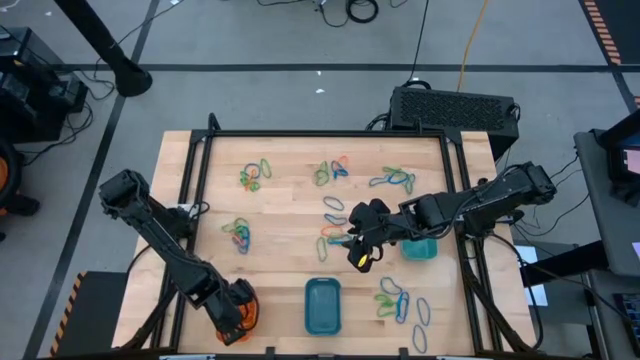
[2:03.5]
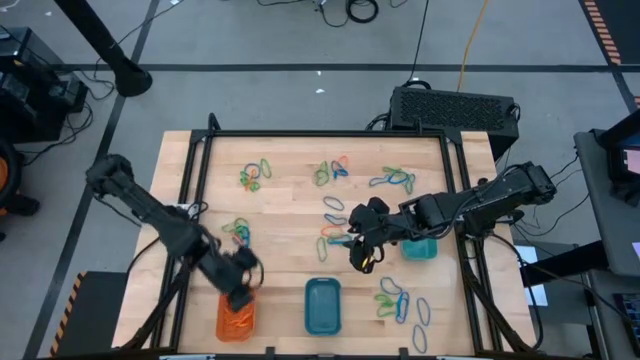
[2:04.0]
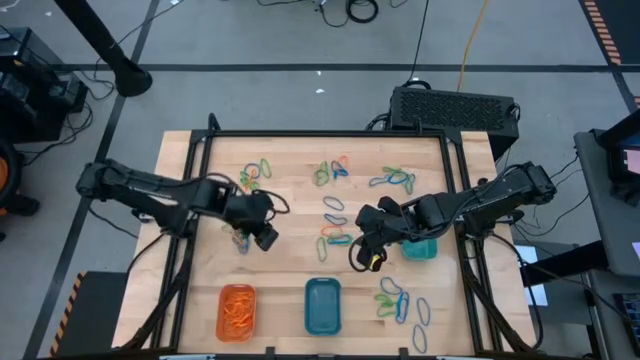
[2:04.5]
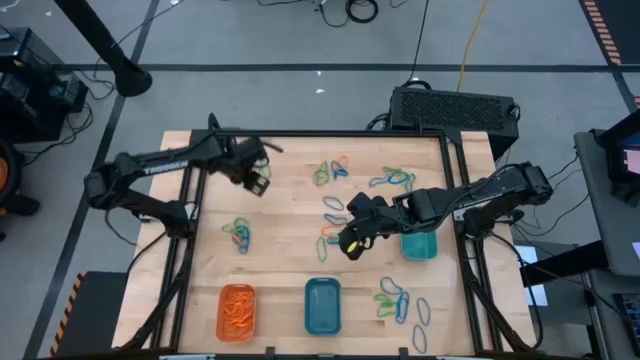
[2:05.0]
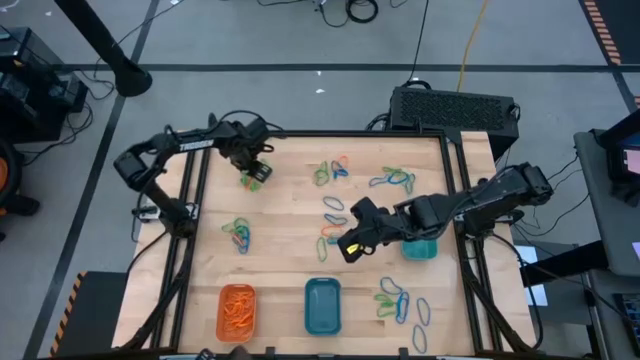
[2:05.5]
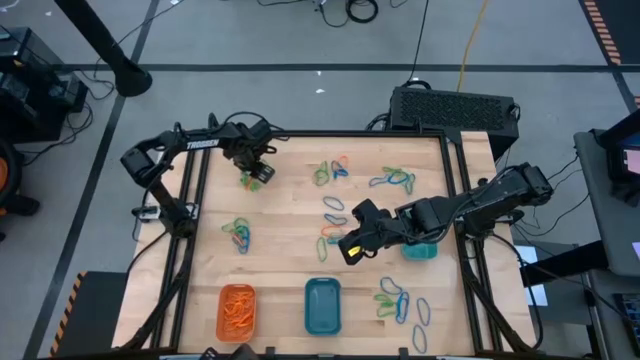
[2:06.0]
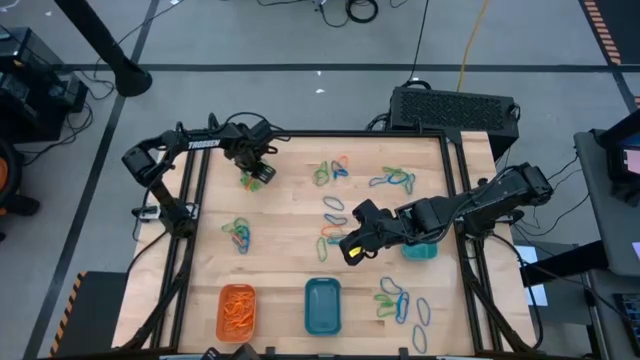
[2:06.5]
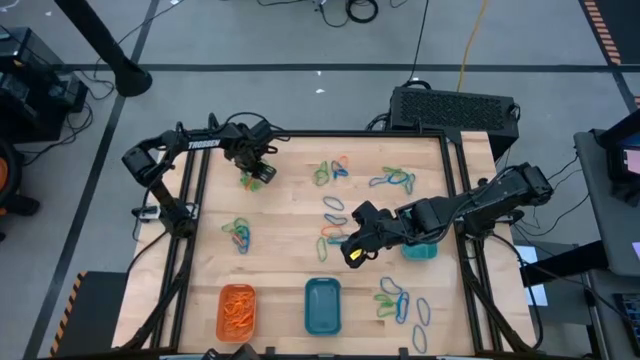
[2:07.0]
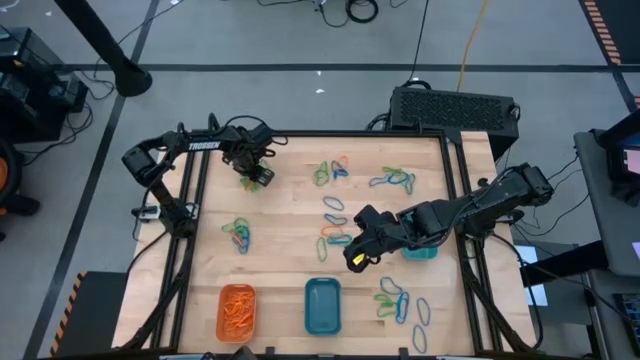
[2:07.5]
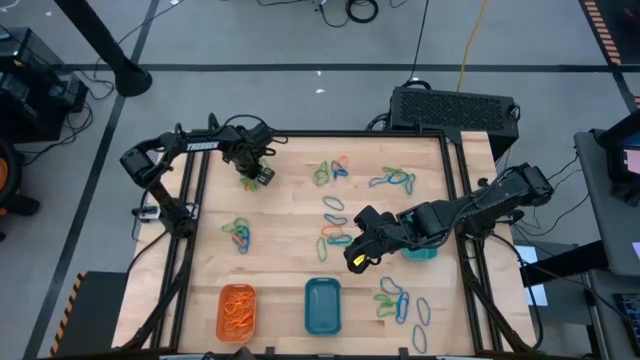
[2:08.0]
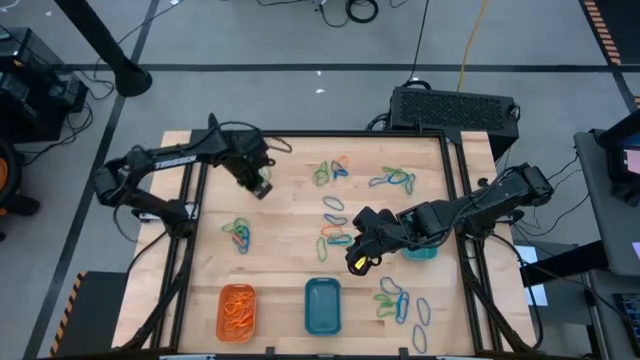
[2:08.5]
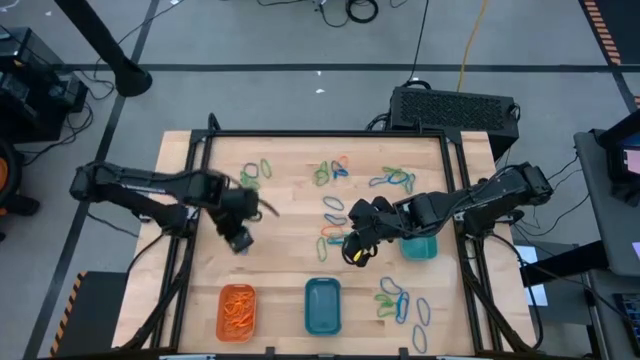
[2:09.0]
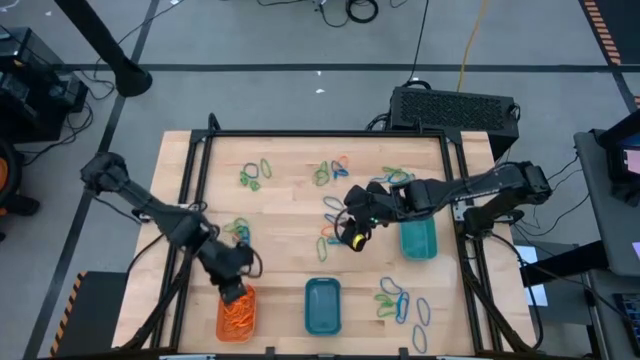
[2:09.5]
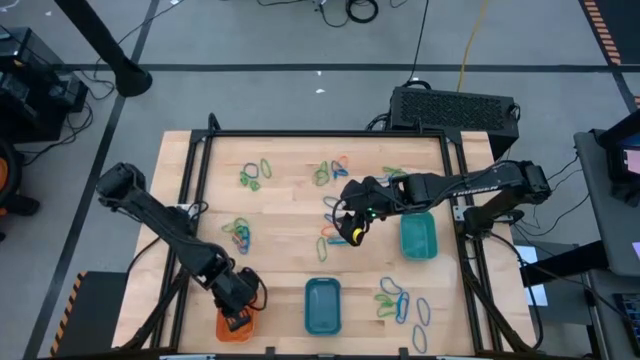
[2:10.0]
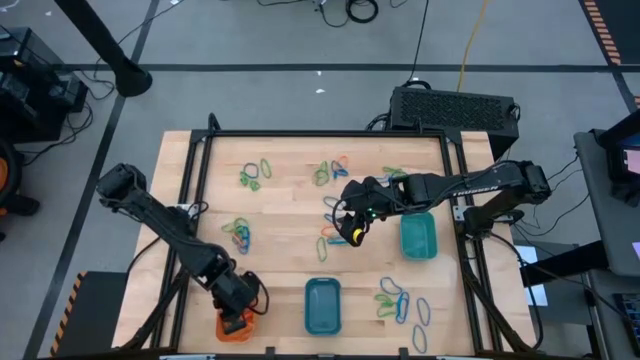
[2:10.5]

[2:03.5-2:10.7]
Task: Sort rubber bands into baskets
Put the orange rubber band into the orange bin

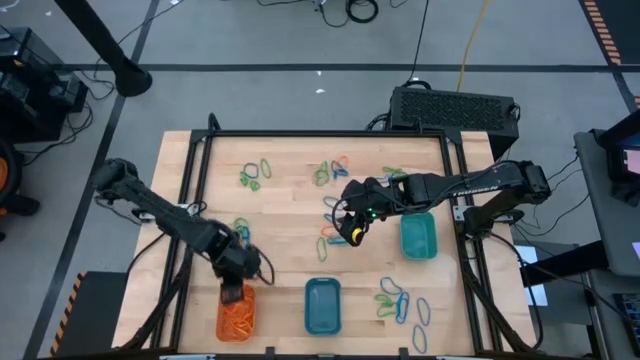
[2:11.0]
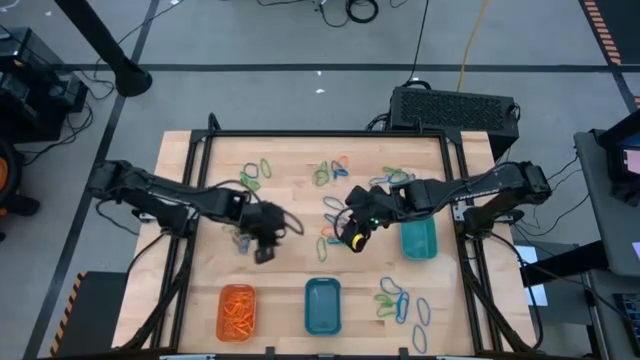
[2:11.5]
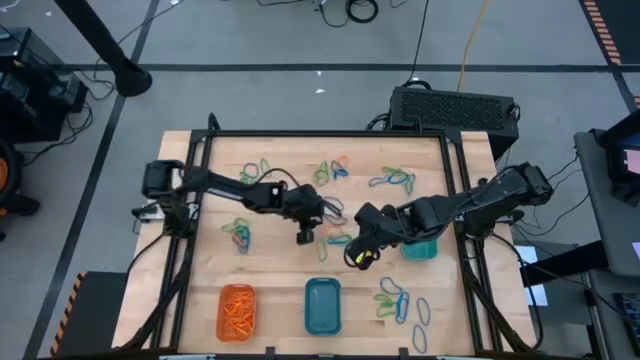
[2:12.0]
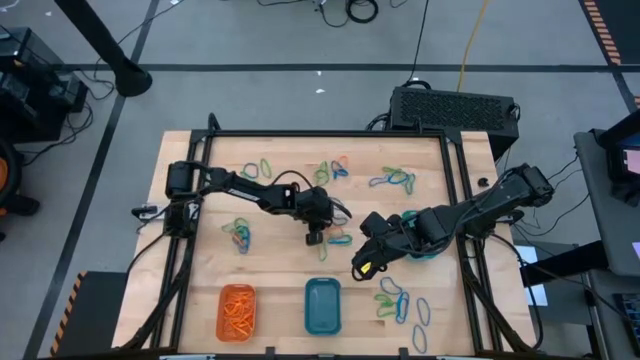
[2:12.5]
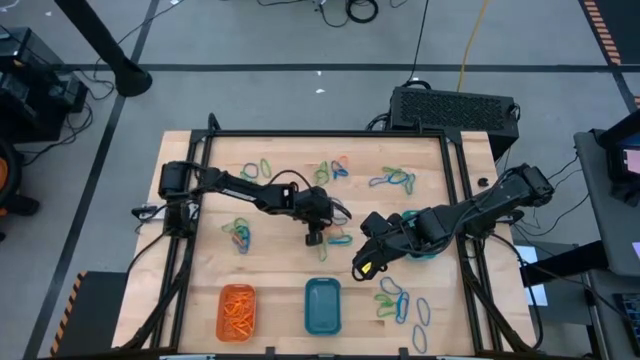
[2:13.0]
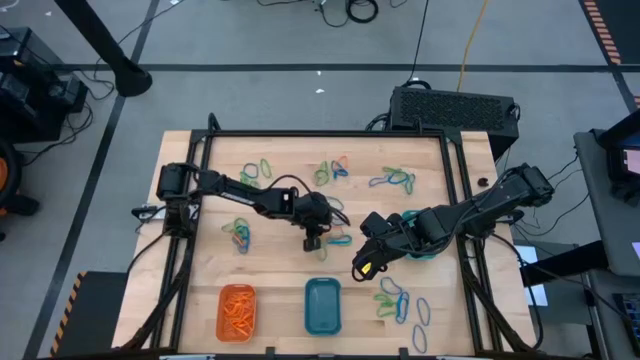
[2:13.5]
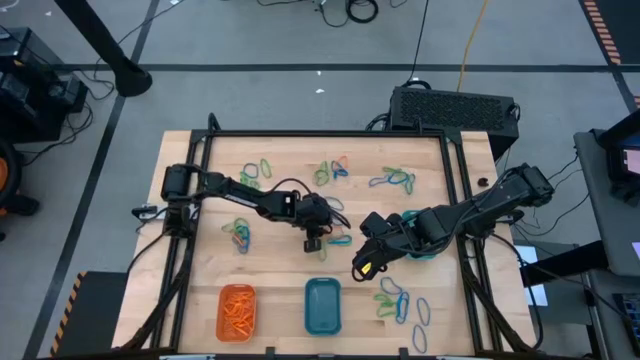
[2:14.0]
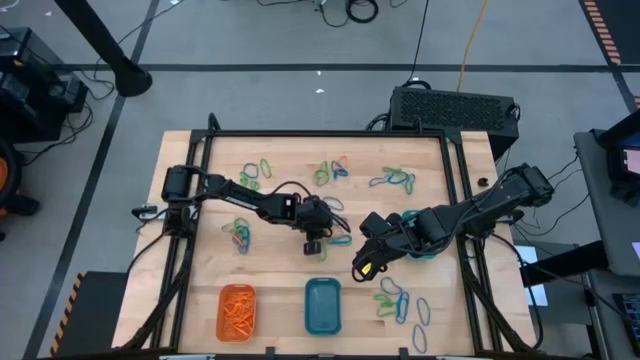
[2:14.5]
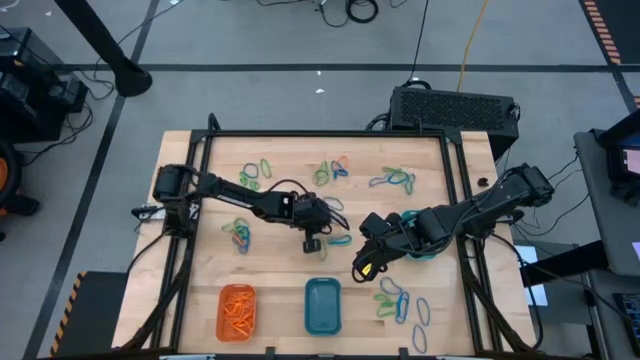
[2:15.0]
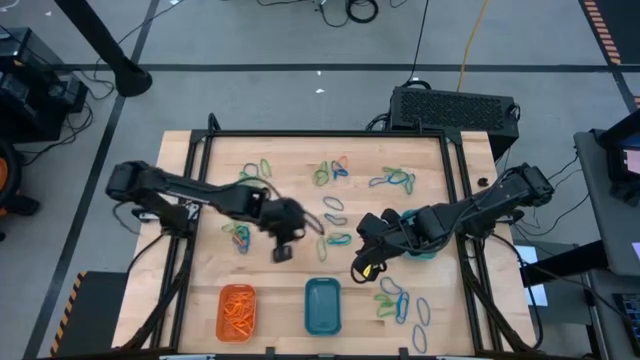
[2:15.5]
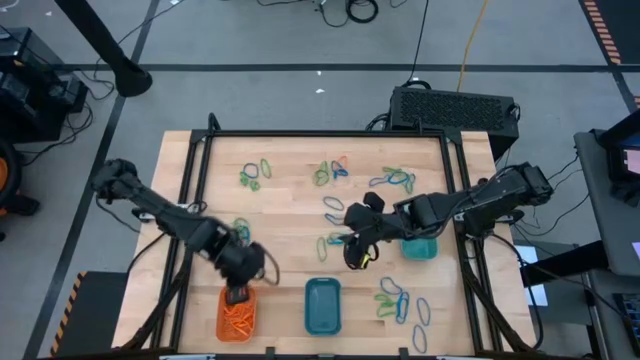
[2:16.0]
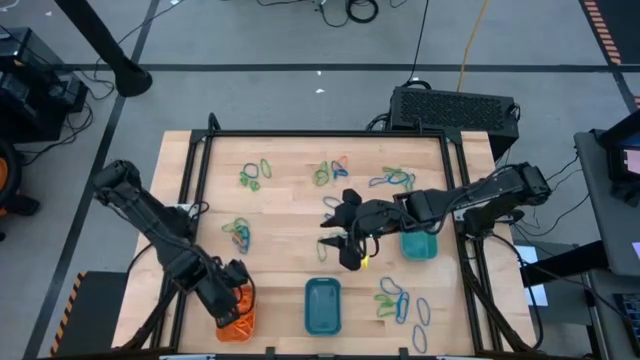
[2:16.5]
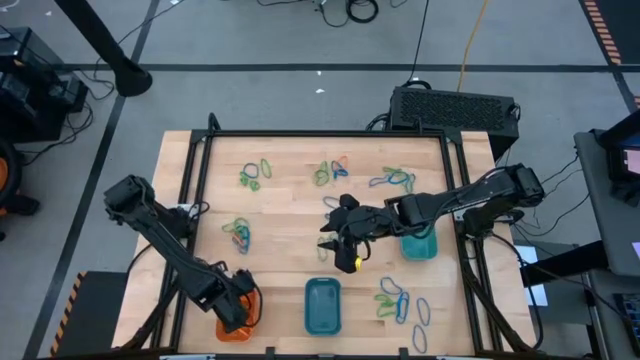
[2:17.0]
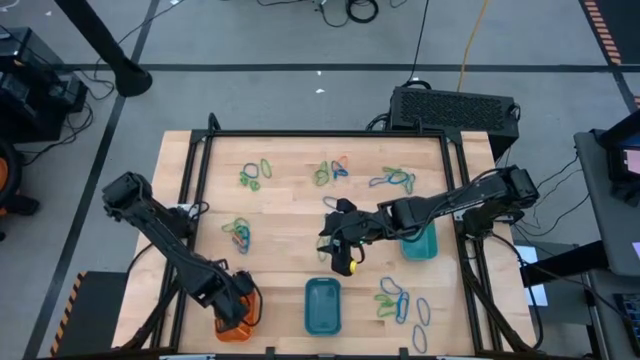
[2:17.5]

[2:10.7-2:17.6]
Put the orange rubber band into the orange bin

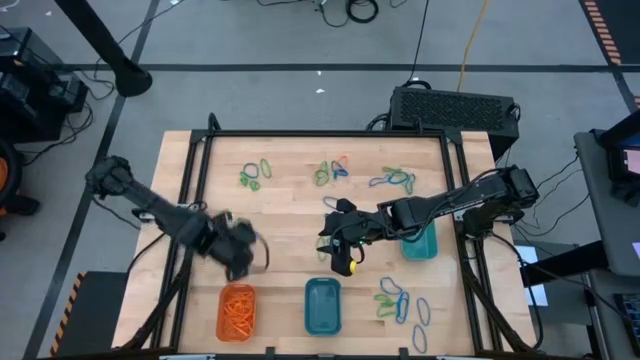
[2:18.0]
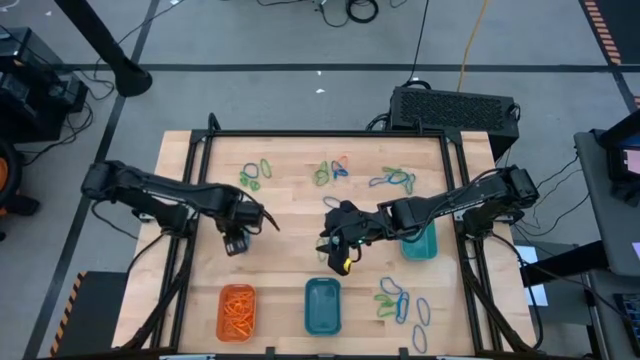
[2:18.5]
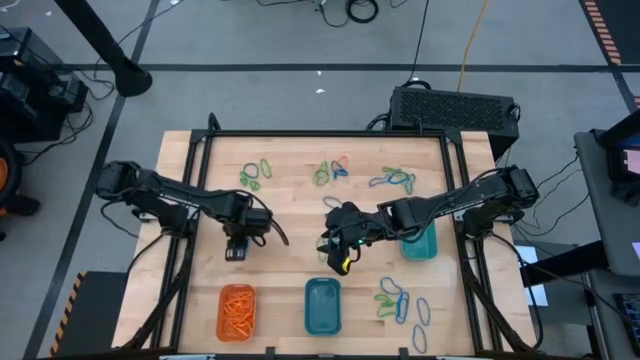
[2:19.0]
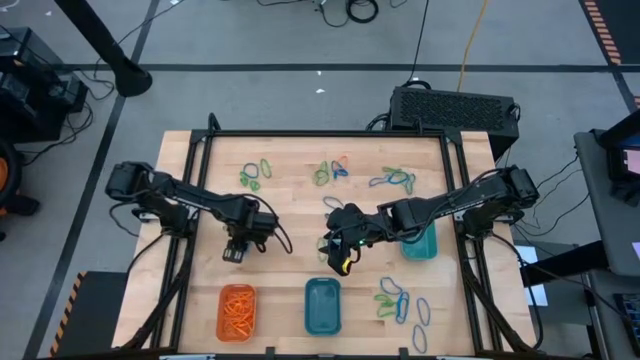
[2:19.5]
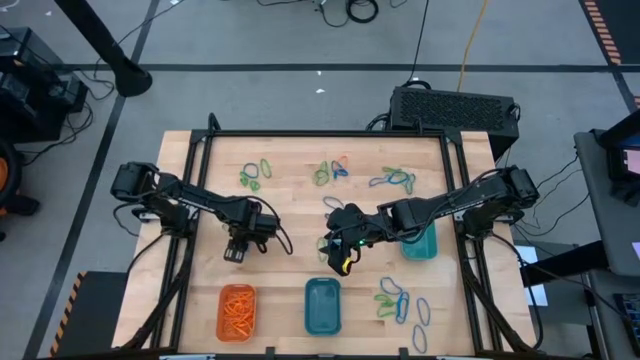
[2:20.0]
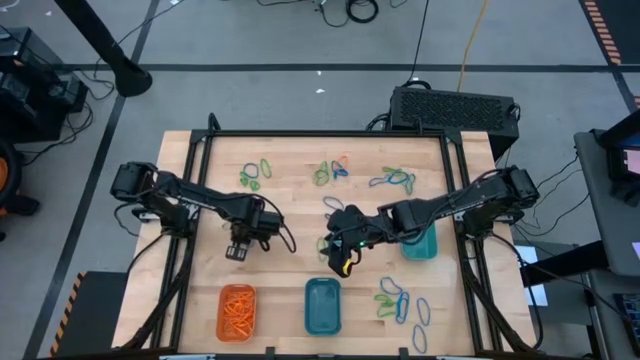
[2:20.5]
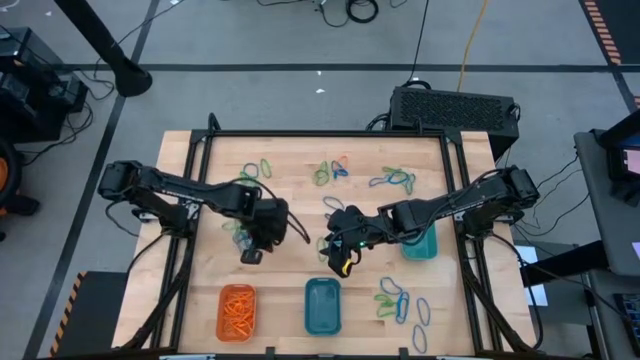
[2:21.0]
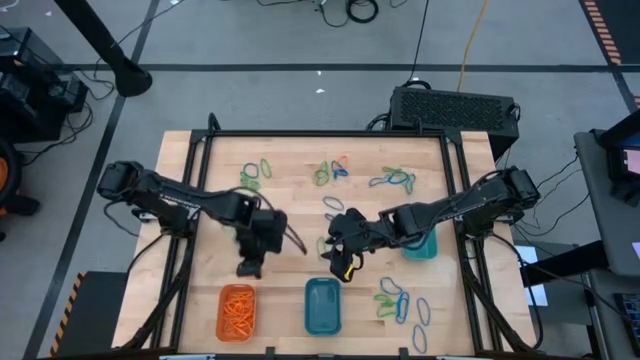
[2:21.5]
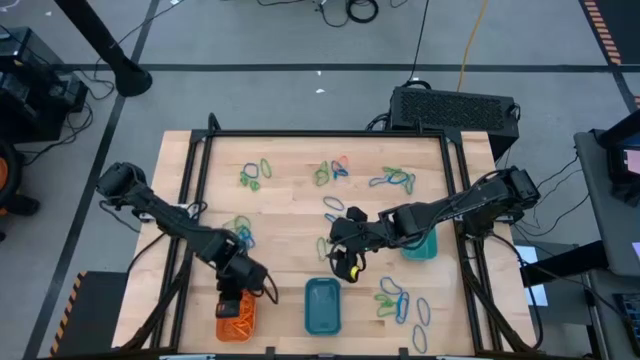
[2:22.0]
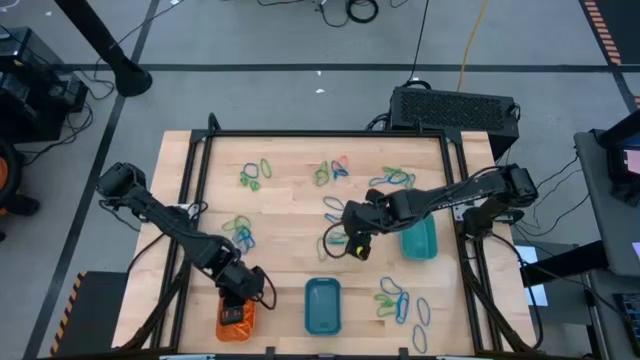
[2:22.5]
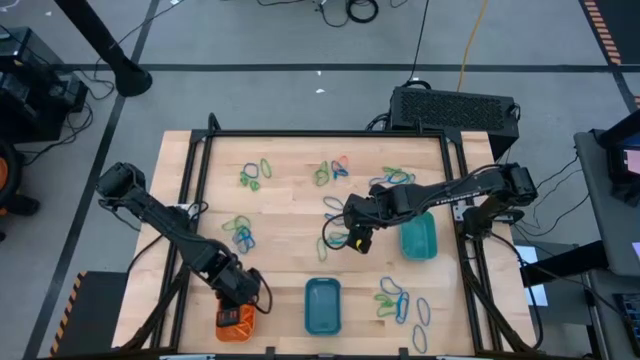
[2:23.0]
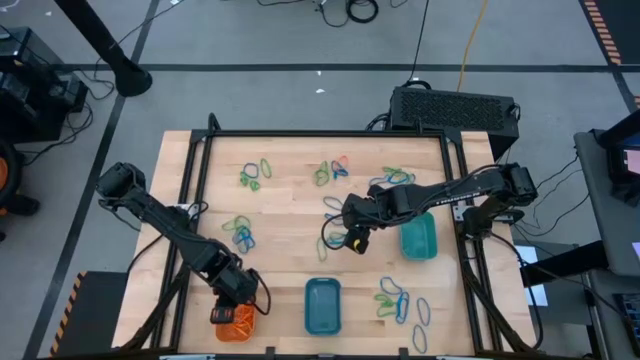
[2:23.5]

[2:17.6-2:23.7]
Put the orange rubber band into the orange bin
